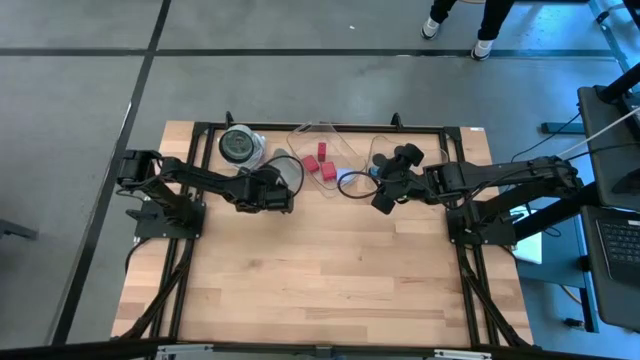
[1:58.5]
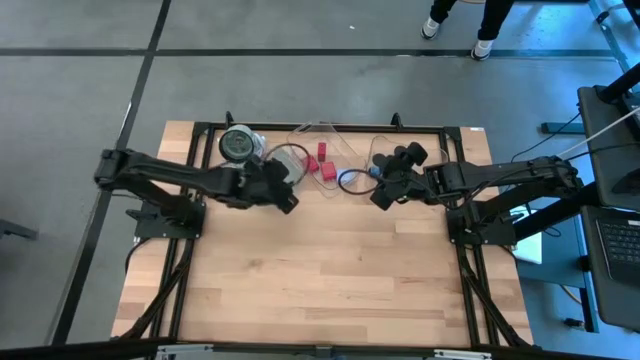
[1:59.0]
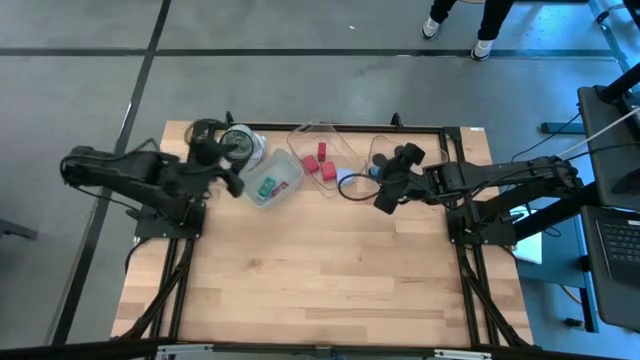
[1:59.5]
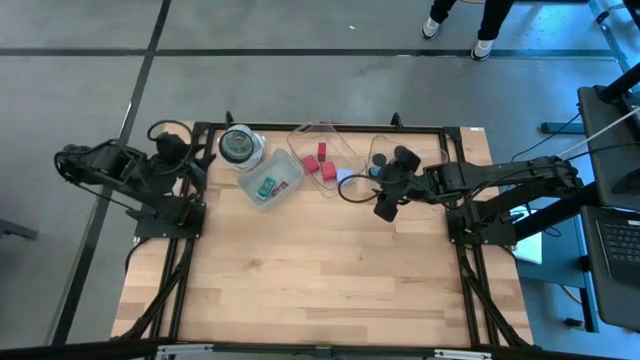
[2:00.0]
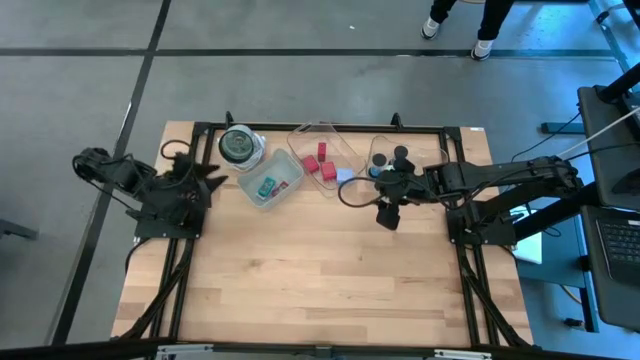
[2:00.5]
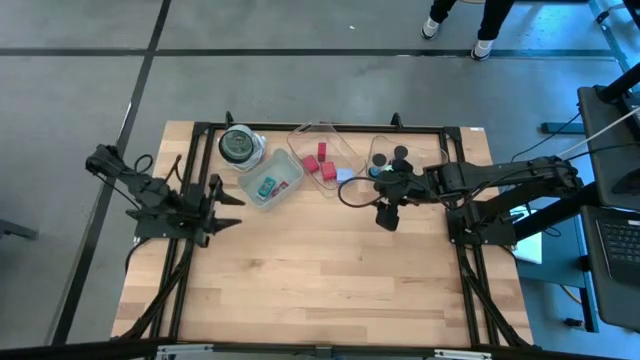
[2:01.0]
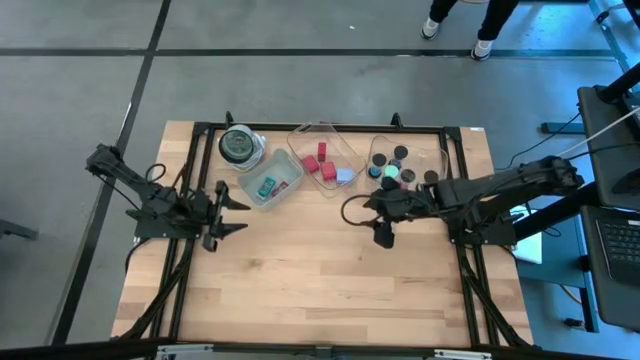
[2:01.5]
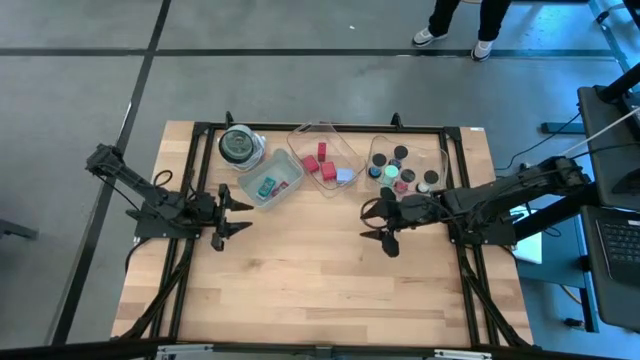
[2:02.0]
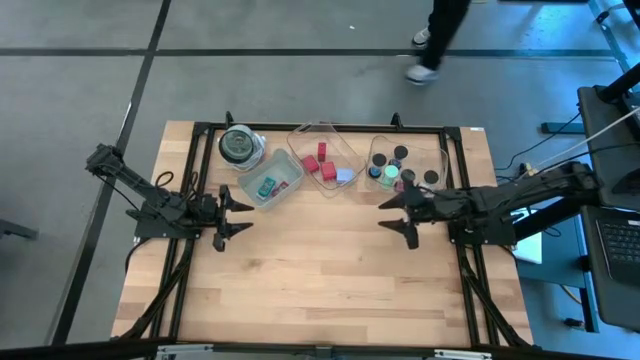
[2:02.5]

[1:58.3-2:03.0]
Task: Pick & Place Office items
Return to Home Position

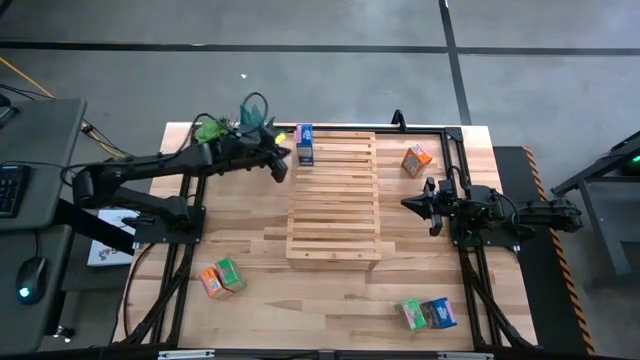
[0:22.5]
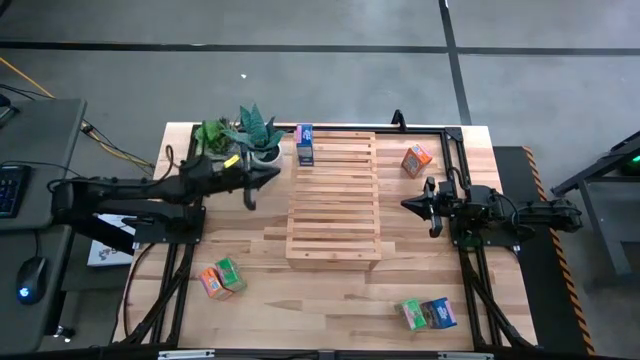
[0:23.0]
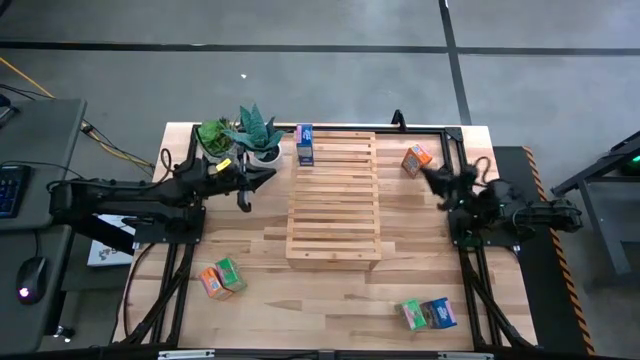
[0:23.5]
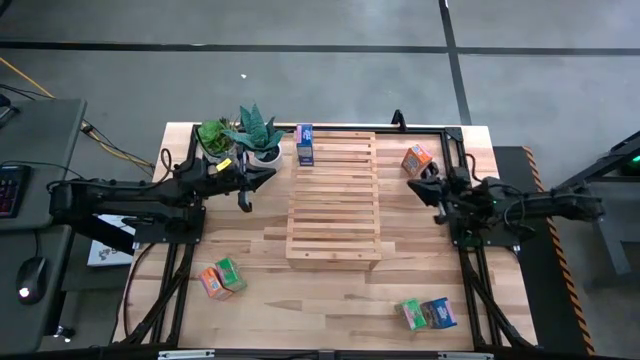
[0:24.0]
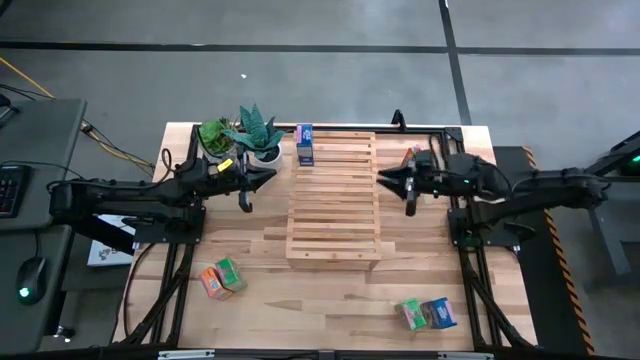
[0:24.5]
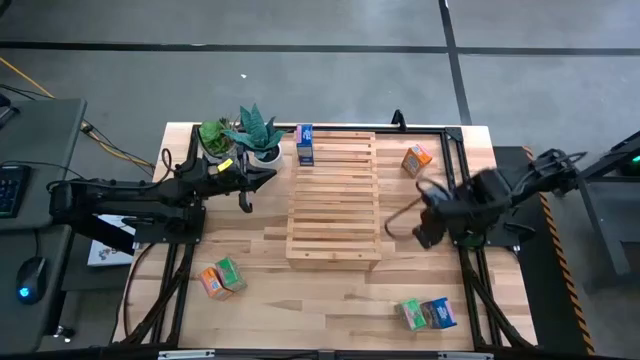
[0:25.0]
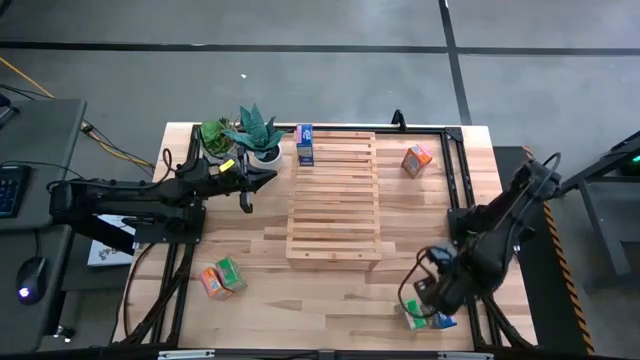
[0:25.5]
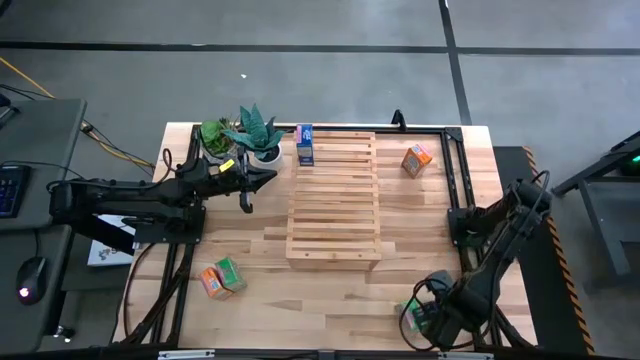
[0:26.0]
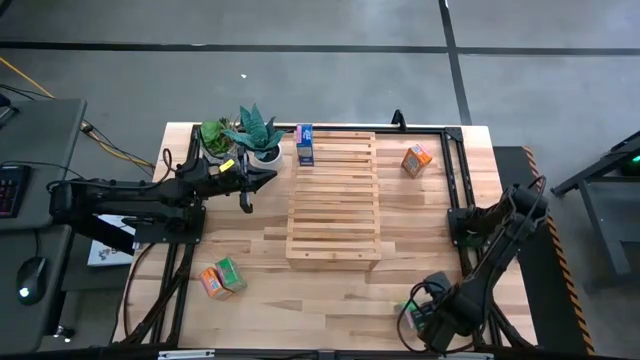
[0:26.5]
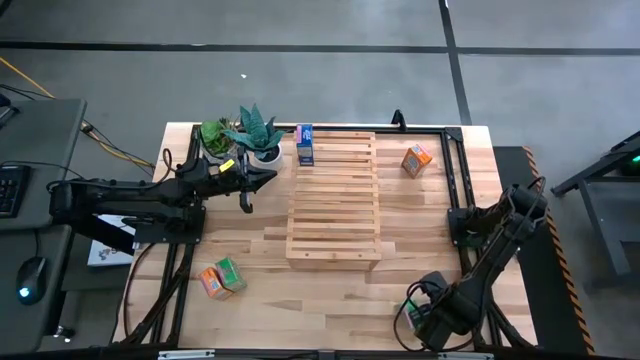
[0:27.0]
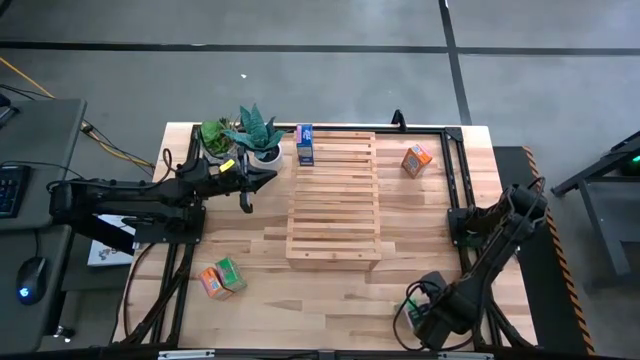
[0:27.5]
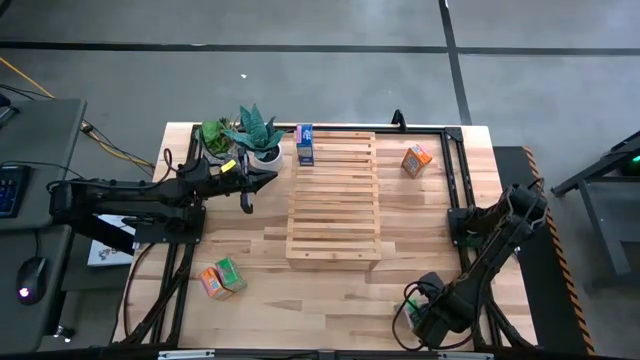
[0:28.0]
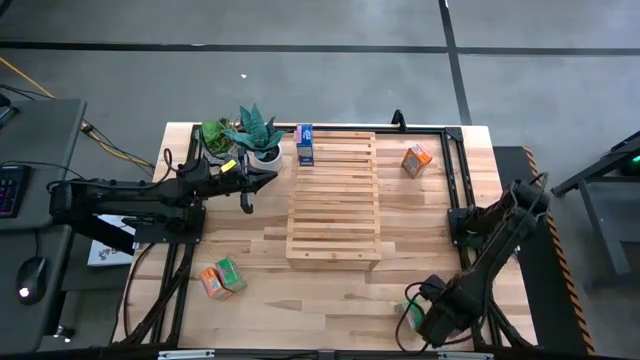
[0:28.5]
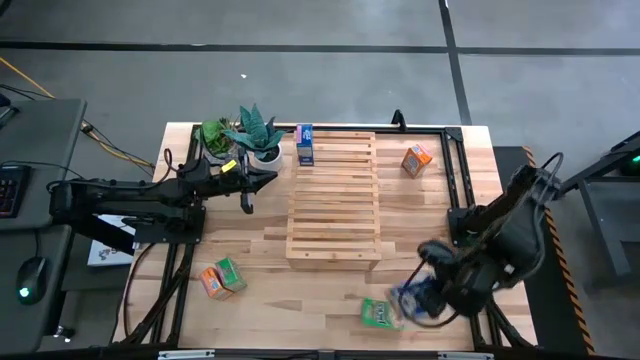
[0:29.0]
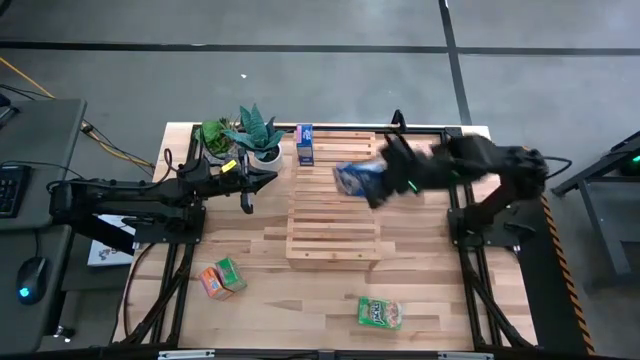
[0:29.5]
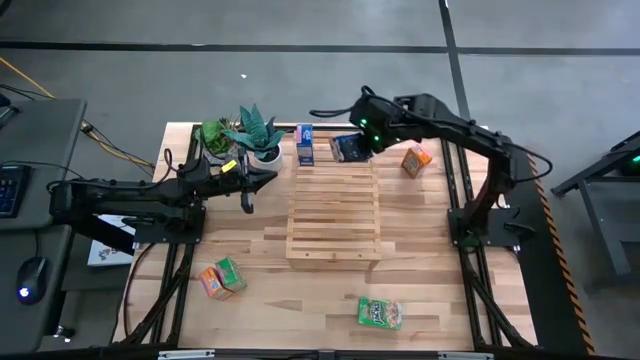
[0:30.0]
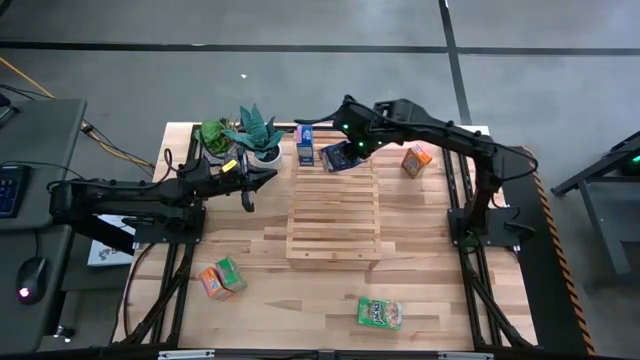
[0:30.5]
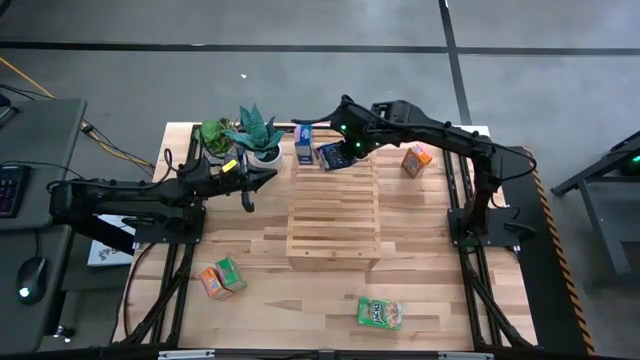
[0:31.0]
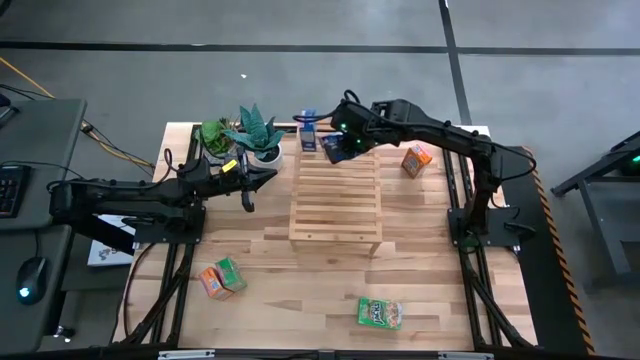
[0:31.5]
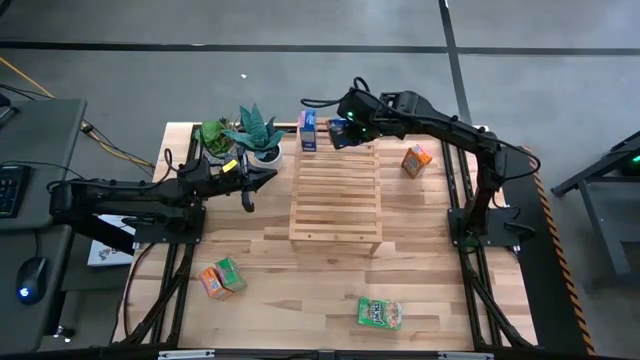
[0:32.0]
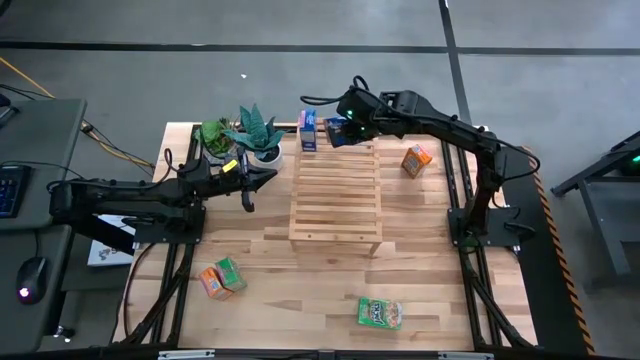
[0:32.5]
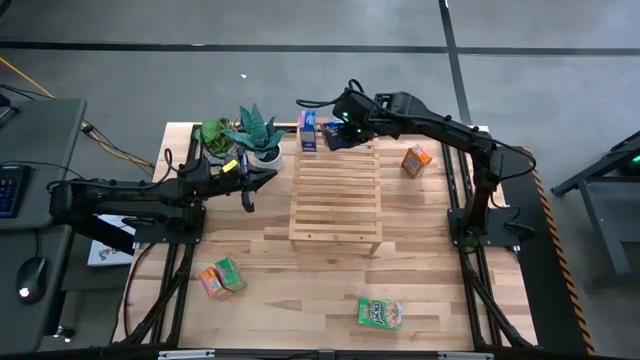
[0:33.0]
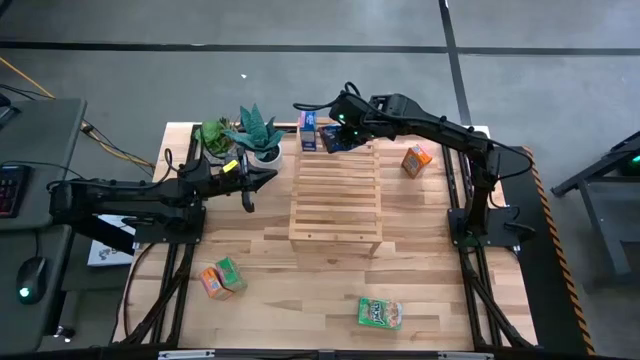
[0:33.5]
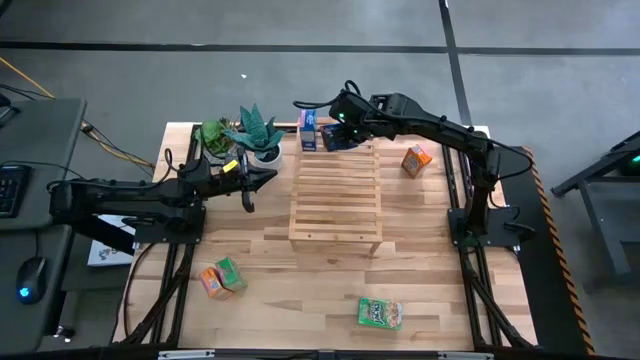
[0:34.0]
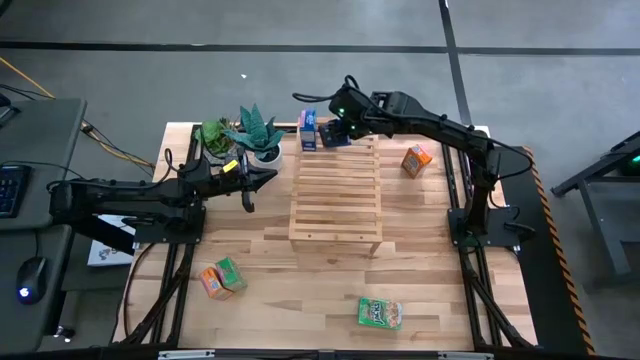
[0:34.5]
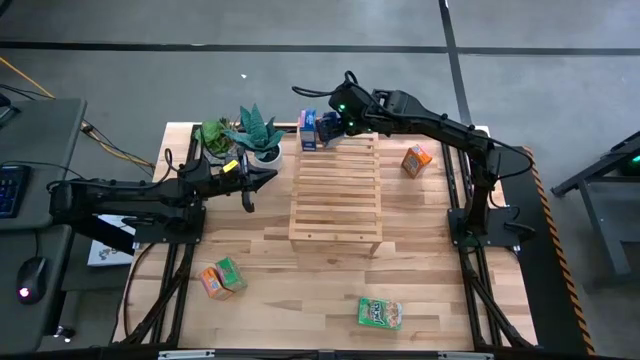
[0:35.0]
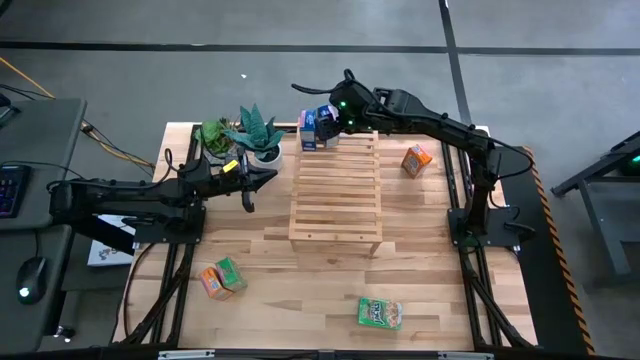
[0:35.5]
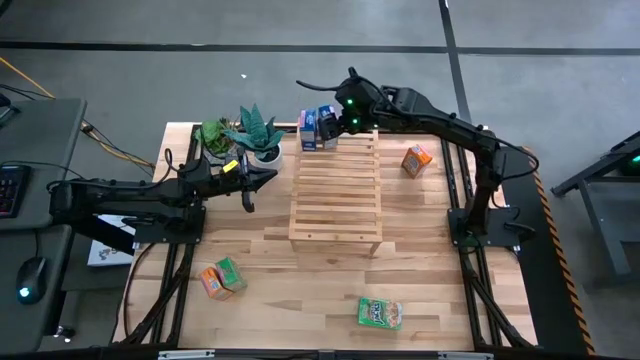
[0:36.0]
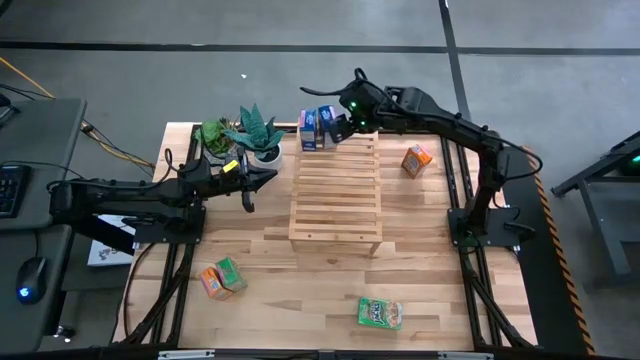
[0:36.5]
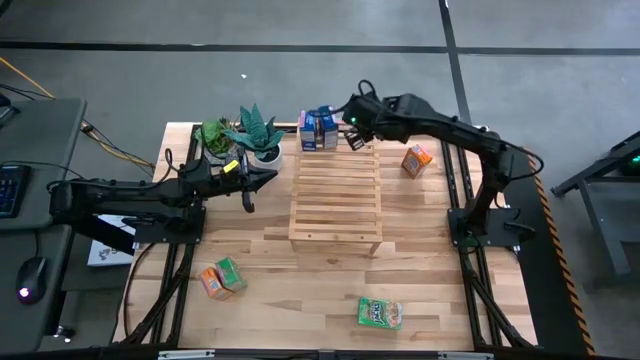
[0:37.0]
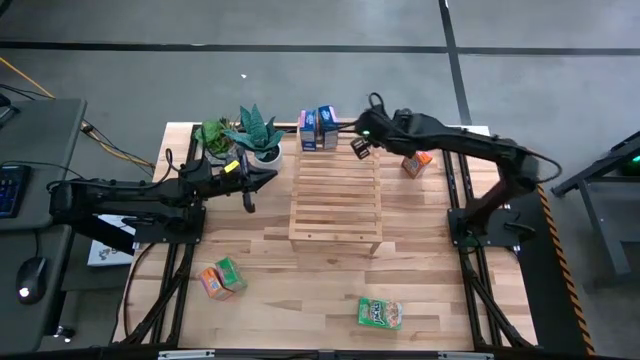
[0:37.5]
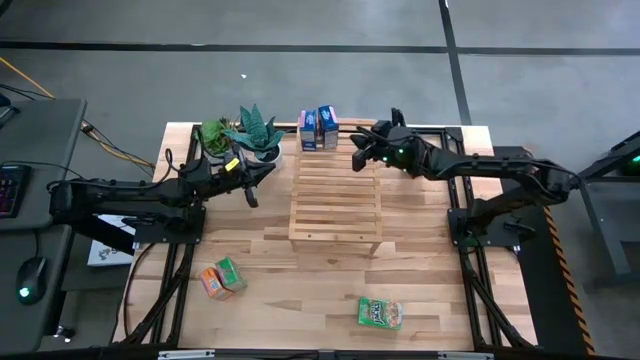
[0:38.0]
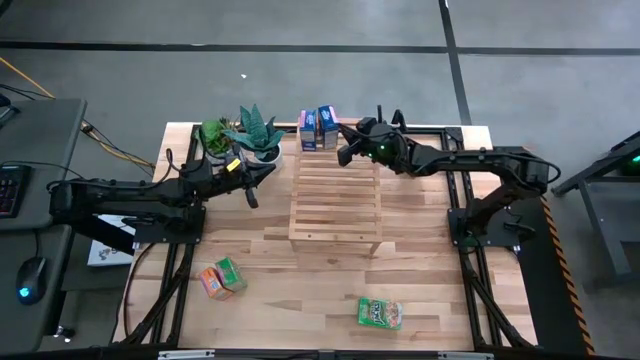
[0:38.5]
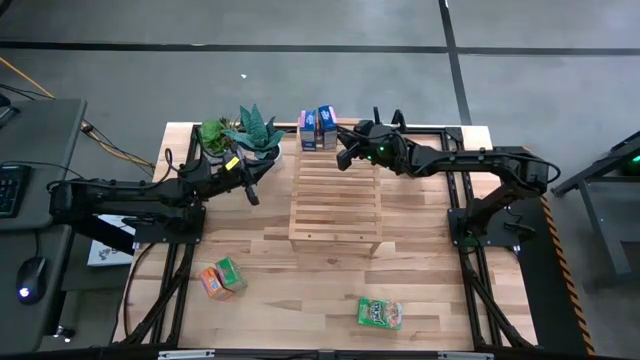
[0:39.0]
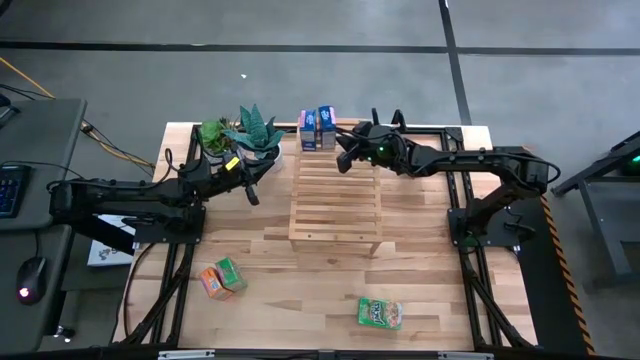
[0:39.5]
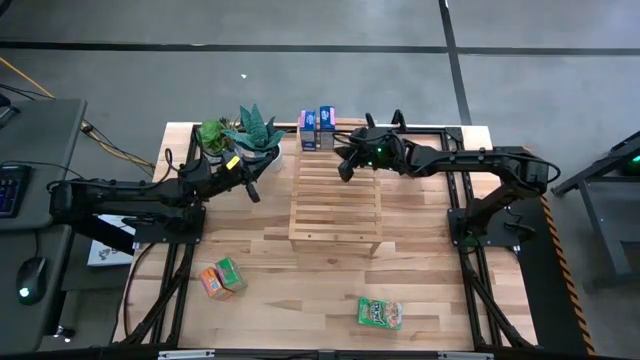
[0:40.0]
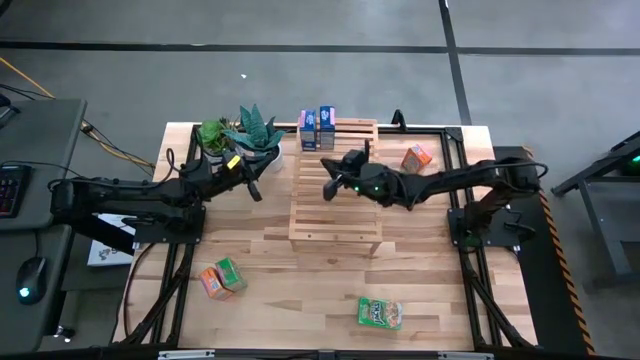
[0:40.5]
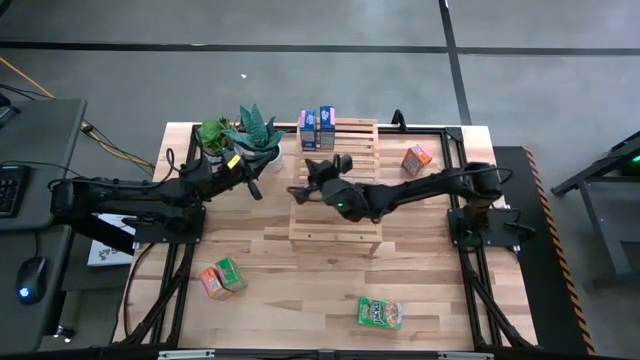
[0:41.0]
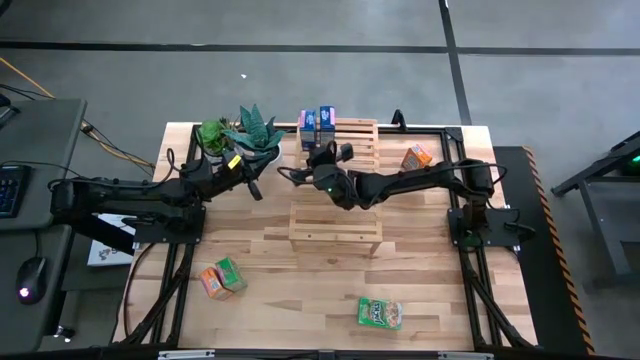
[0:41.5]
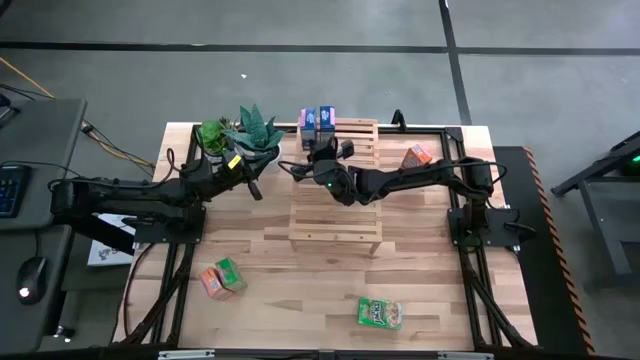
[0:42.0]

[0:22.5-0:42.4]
Task: Stack cereal on shelf
Put the blue cereal box on the shelf aligned with the other blue cereal box
